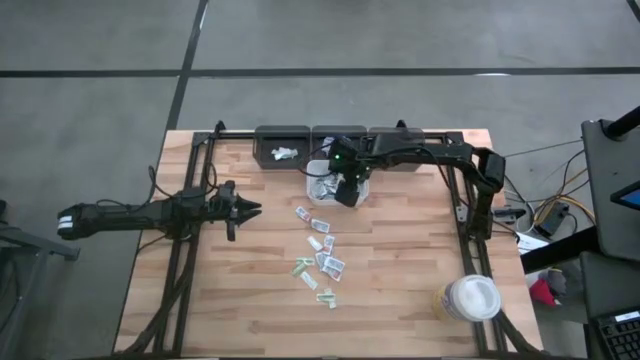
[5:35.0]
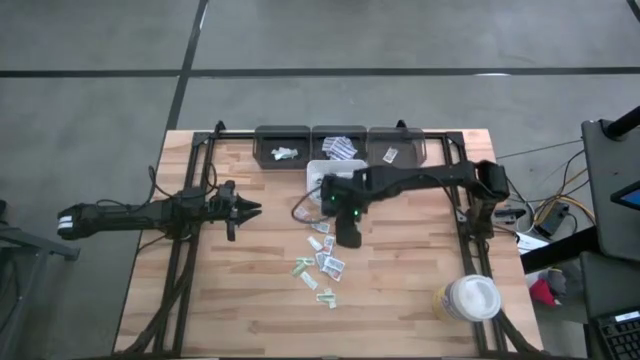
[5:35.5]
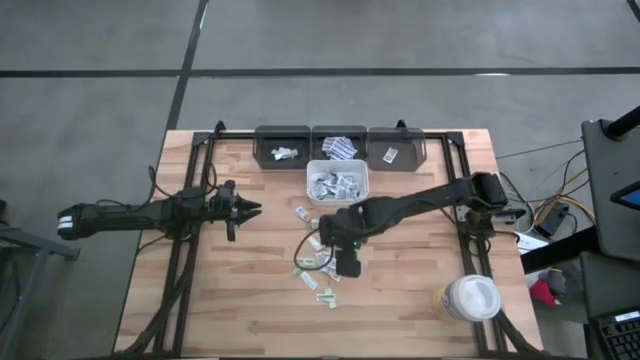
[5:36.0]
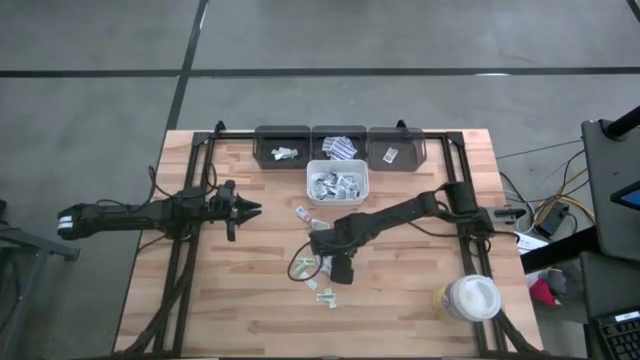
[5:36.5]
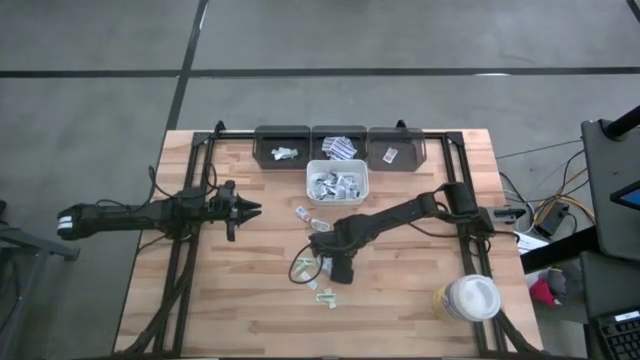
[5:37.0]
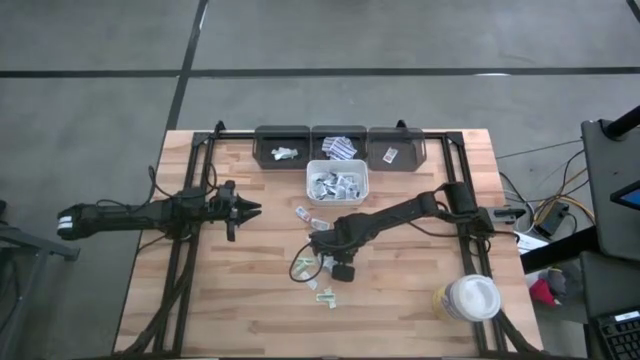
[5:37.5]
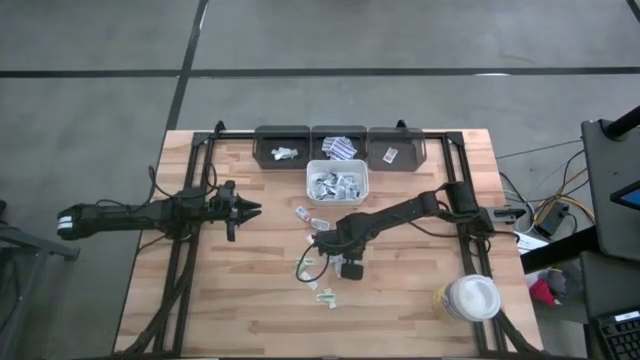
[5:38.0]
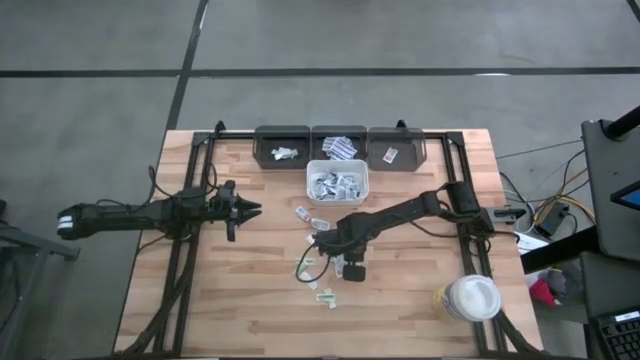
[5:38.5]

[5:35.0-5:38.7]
Task: Pick & Place First Aid Supplies
Put the orange ointment pack into the right black bin

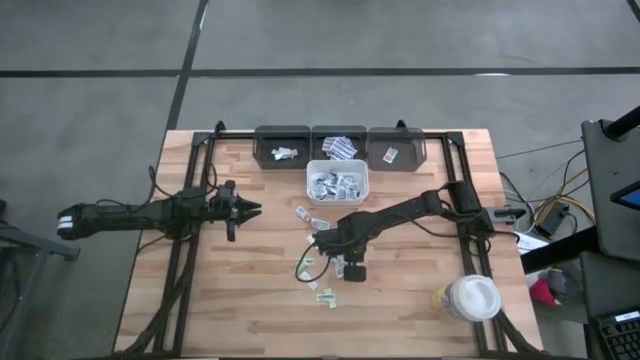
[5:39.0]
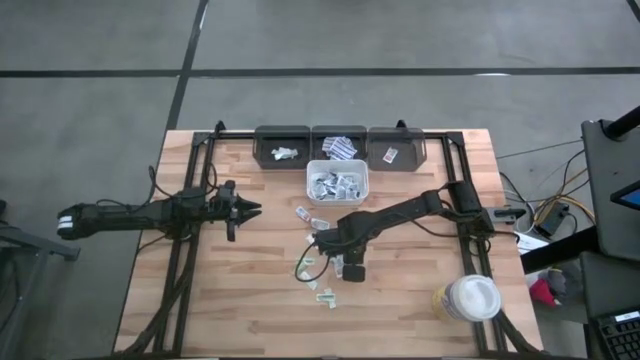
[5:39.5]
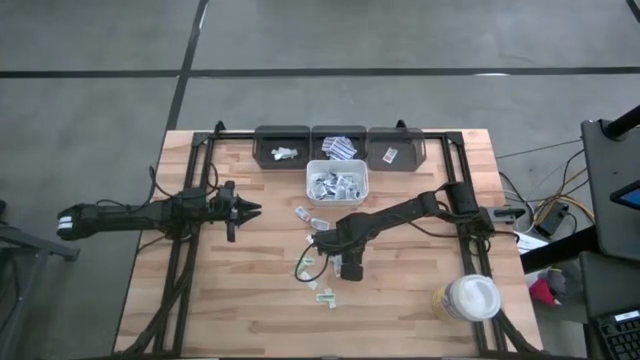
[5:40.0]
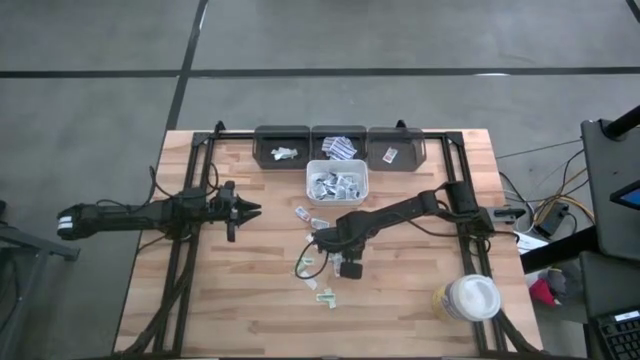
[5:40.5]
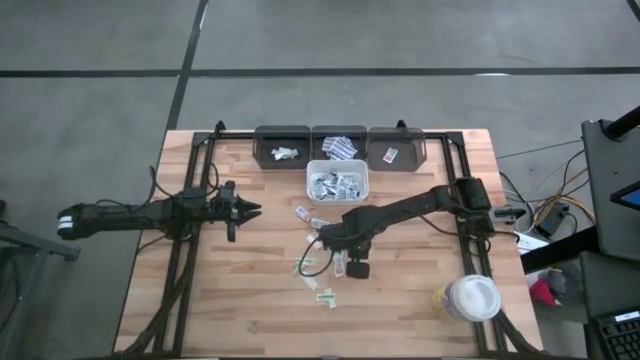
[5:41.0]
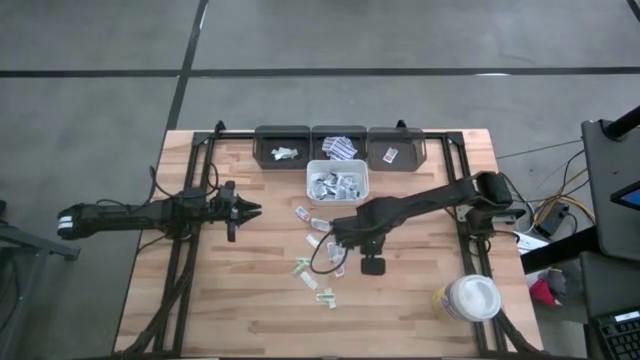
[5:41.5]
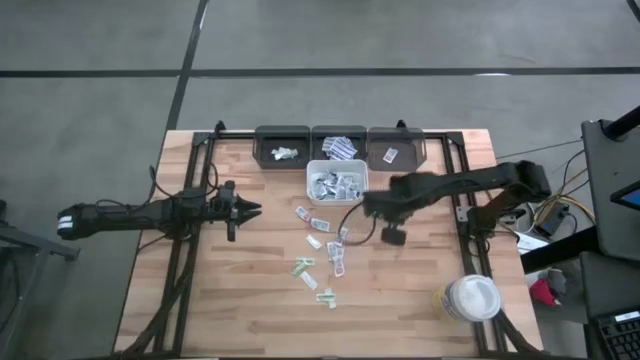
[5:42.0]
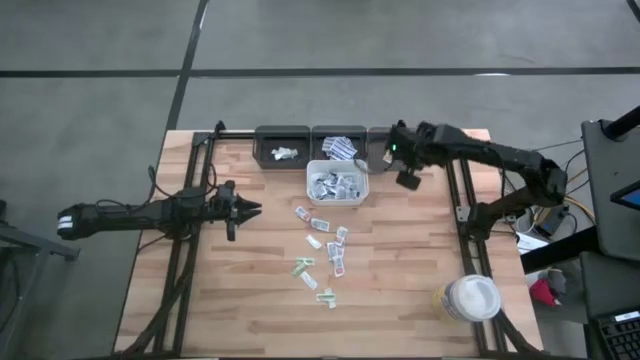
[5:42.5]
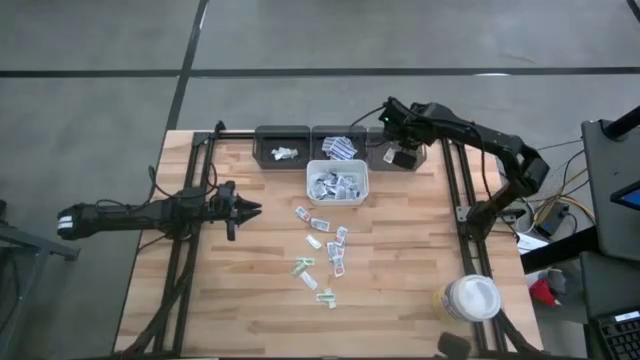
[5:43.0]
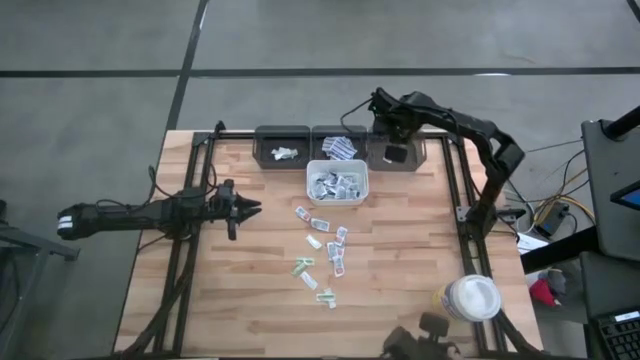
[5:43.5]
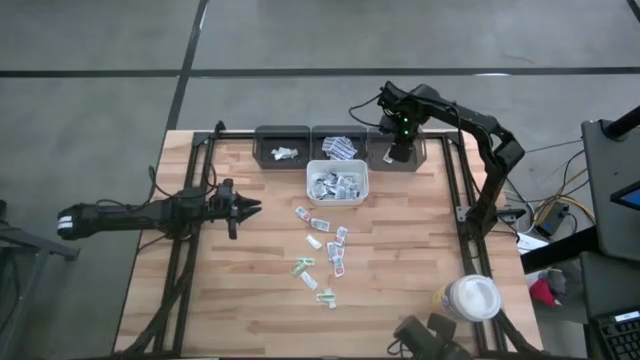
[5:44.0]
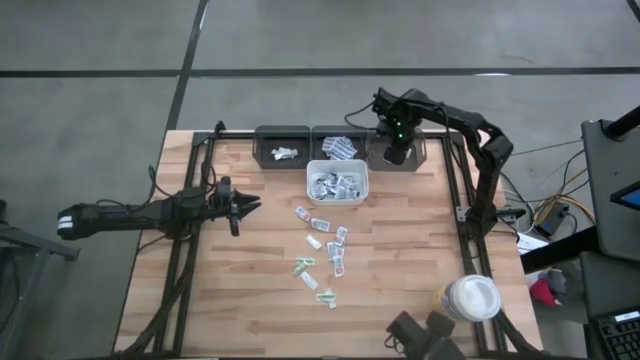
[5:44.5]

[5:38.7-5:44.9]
Put the orange ointment pack into the right black bin

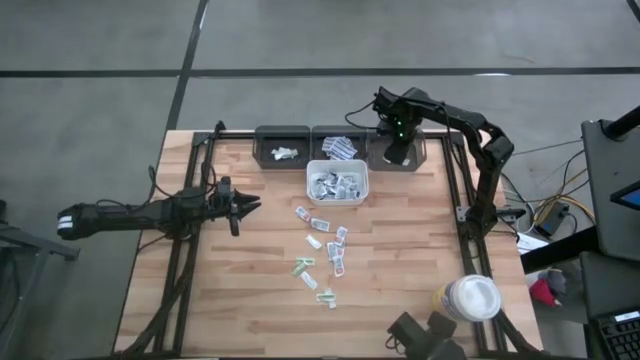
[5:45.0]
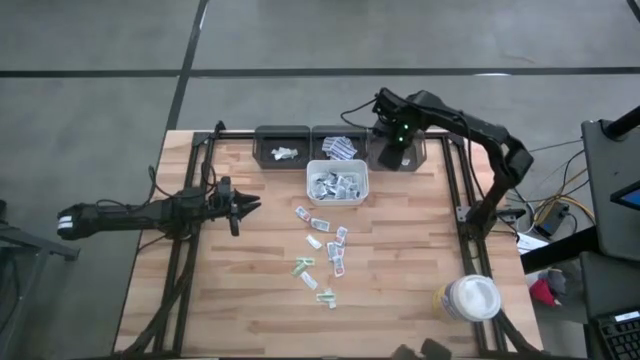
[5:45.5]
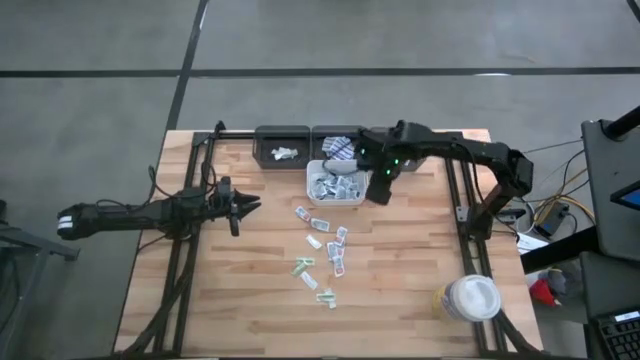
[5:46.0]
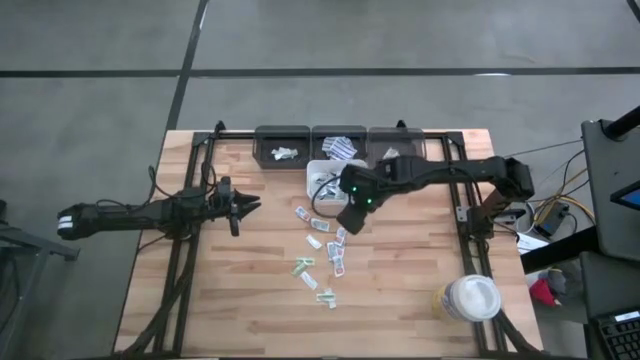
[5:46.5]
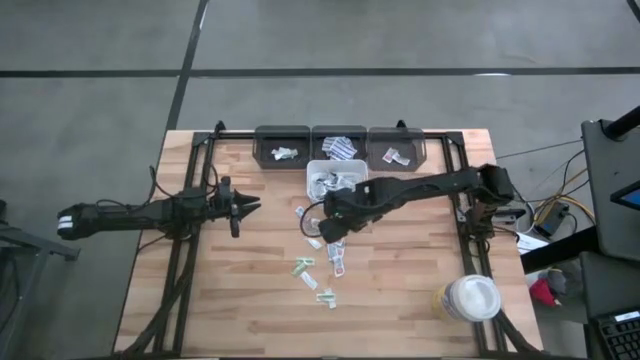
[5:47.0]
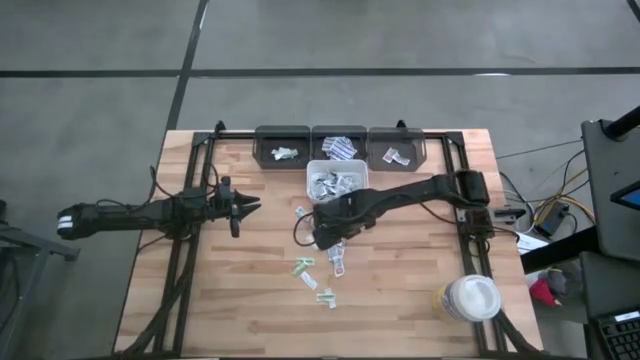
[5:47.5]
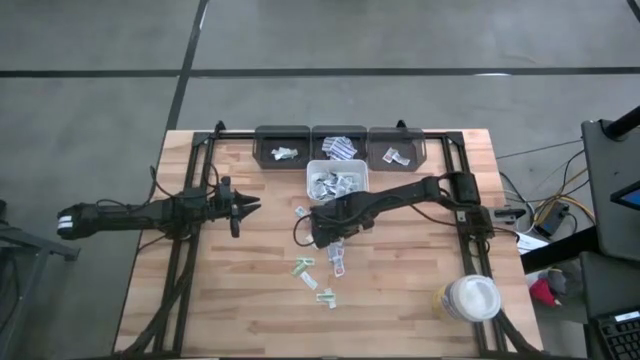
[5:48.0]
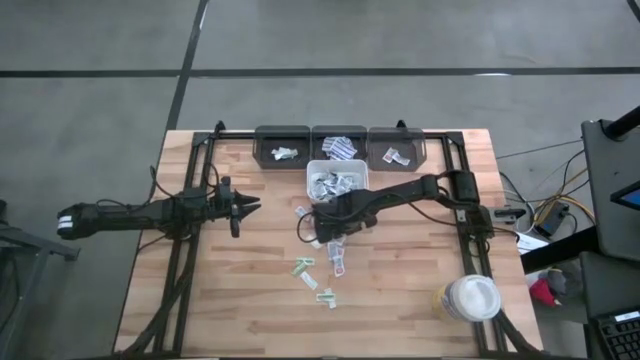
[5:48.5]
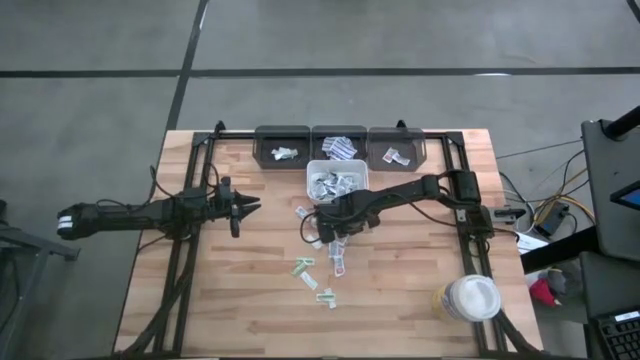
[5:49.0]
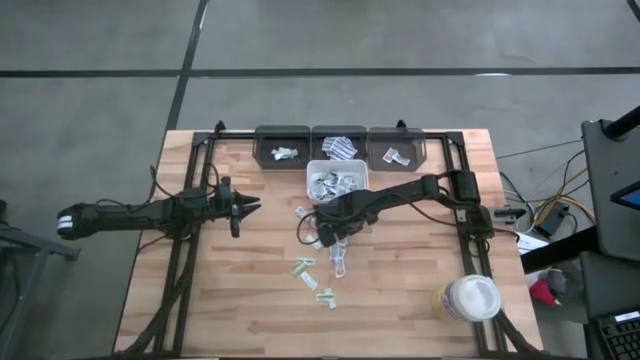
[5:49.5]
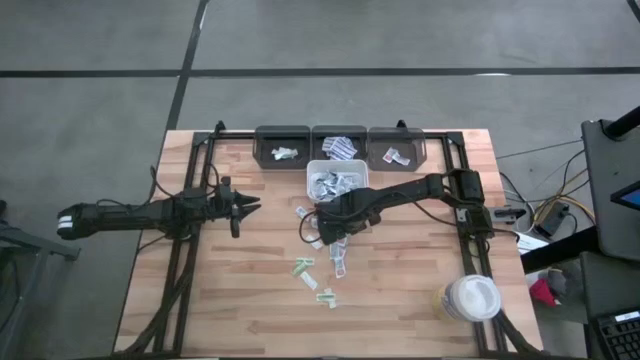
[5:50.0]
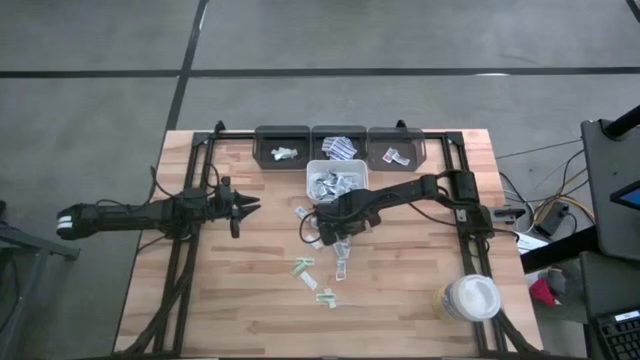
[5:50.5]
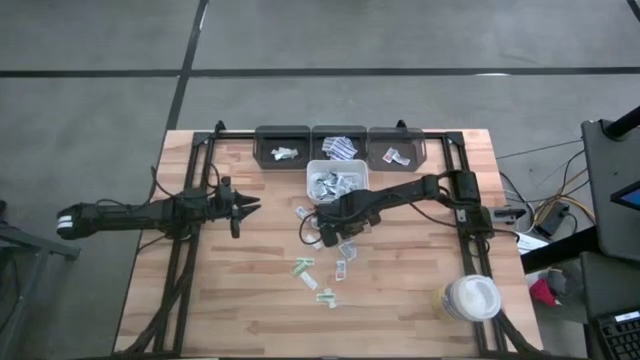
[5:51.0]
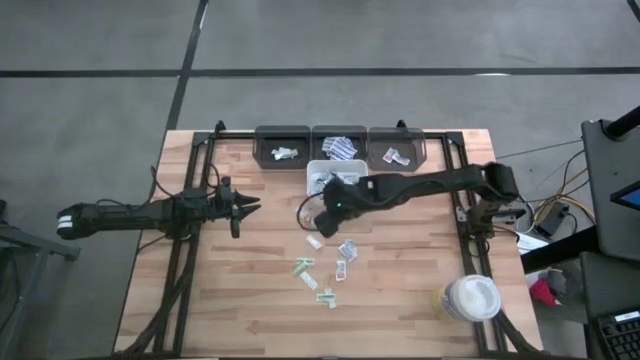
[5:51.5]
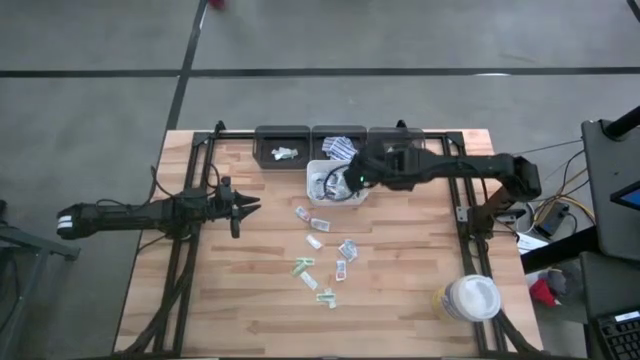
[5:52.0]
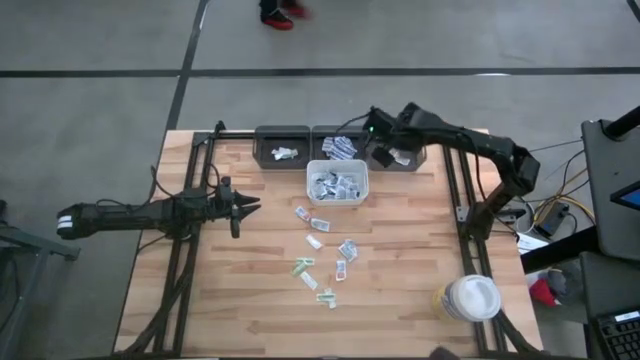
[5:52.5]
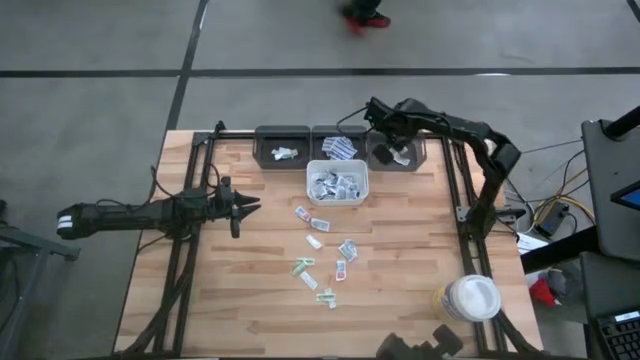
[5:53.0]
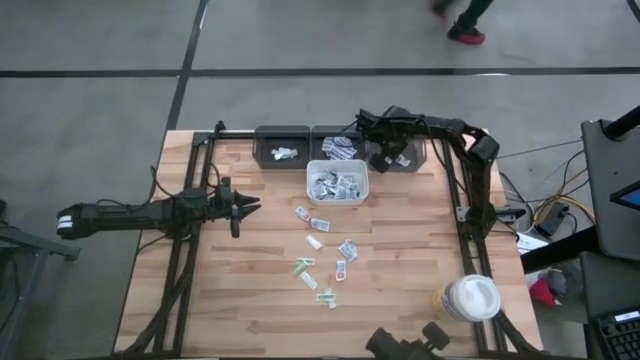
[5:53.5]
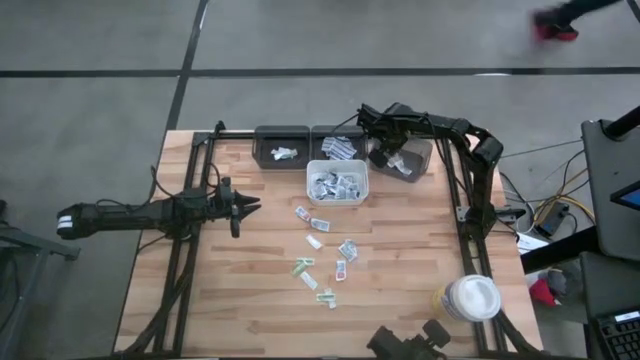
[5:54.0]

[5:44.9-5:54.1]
Put the orange ointment pack into the right black bin

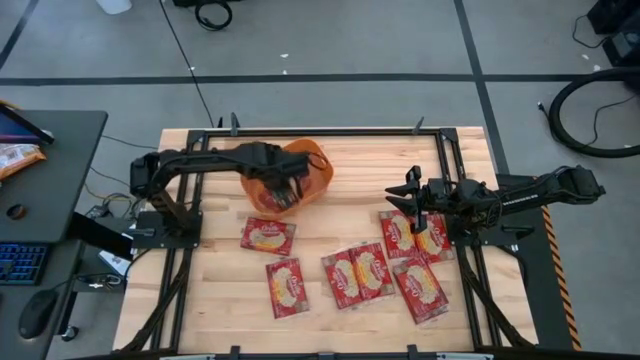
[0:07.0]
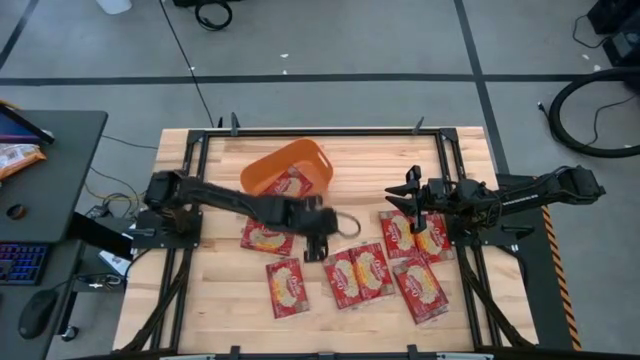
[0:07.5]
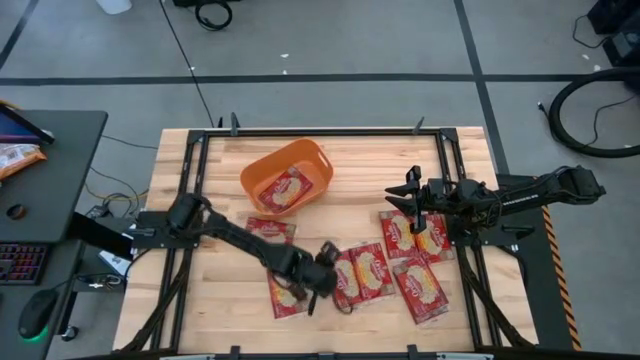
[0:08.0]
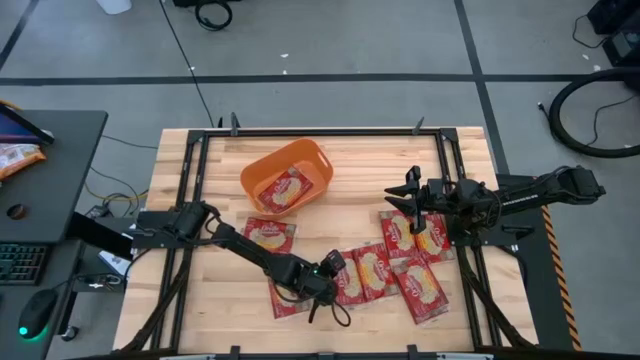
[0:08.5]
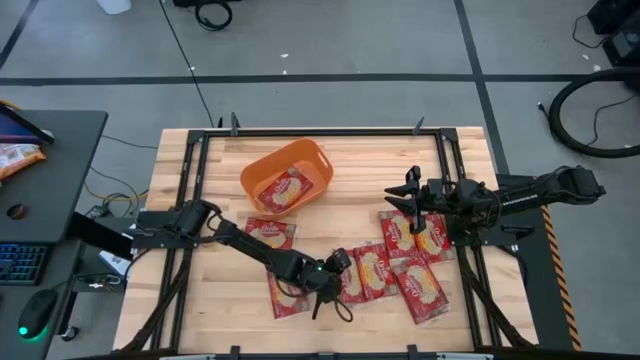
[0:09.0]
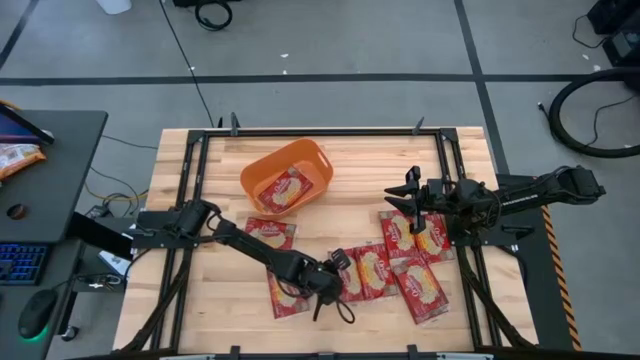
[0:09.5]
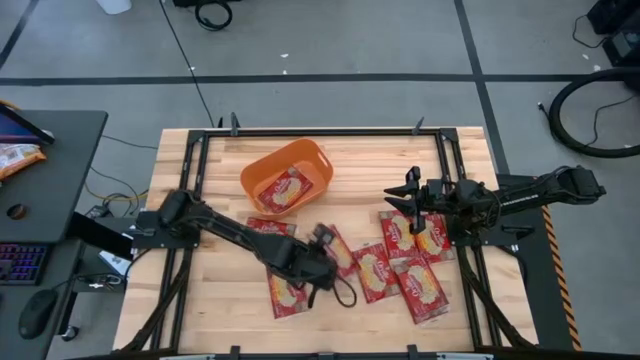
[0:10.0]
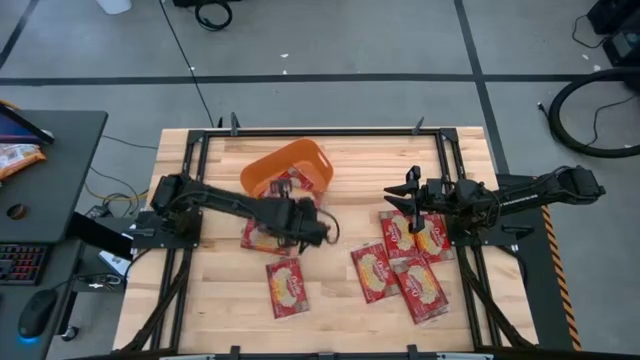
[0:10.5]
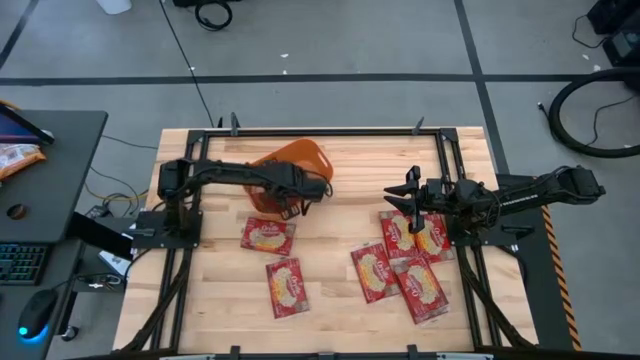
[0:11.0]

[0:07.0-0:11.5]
Task: Sort popcorn bags into baskets
Put the red popcorn bag into the orange bin
